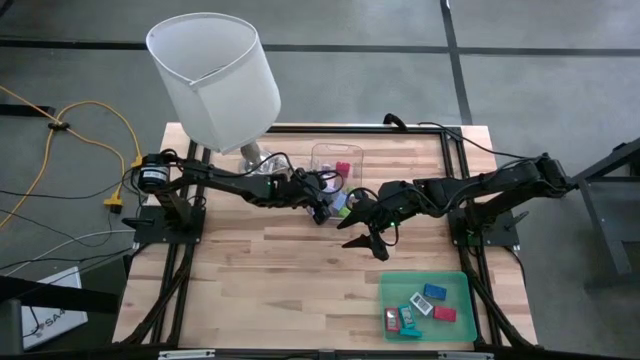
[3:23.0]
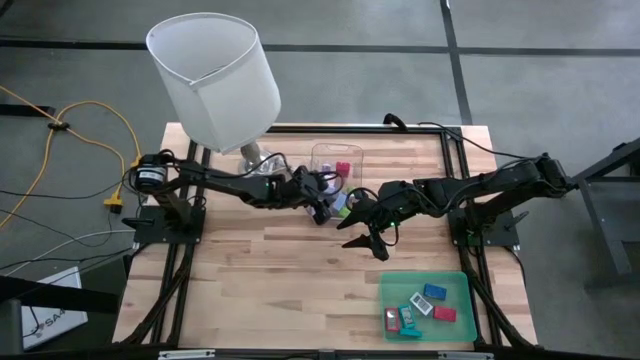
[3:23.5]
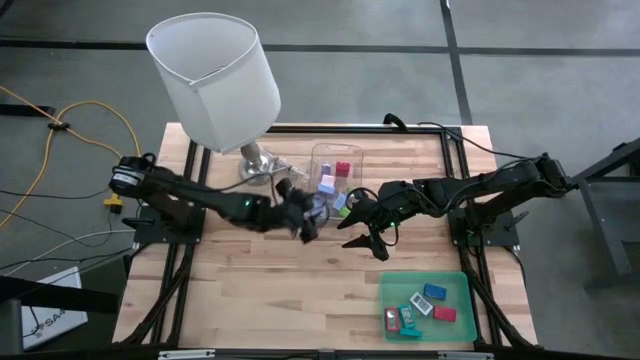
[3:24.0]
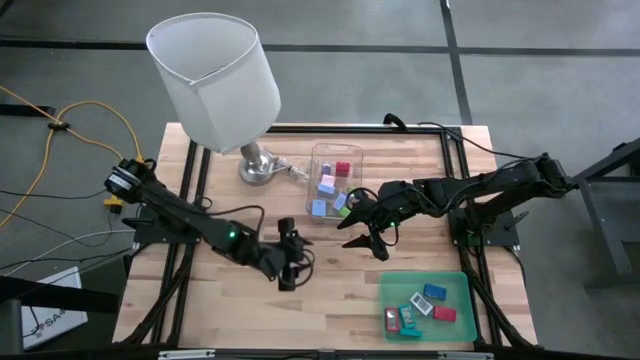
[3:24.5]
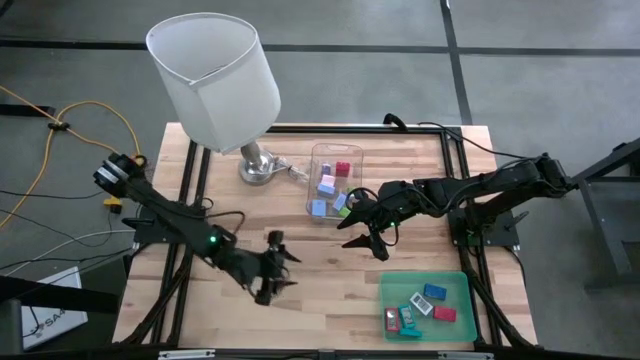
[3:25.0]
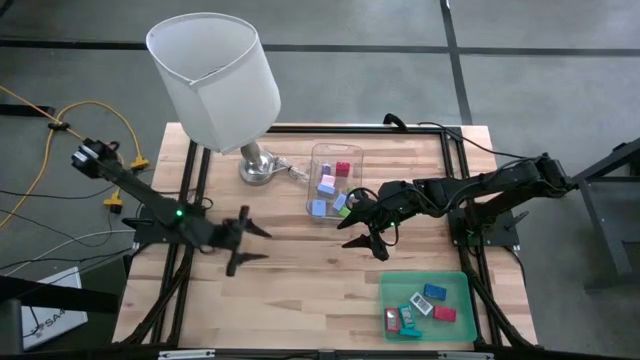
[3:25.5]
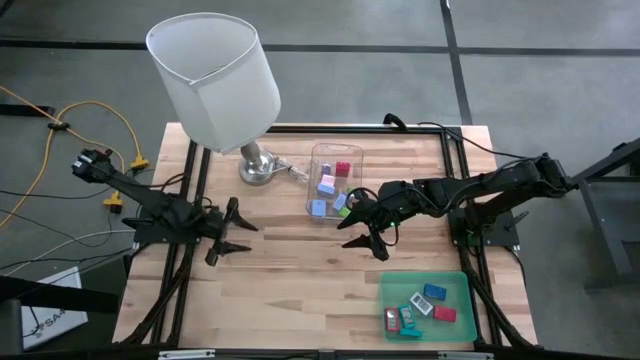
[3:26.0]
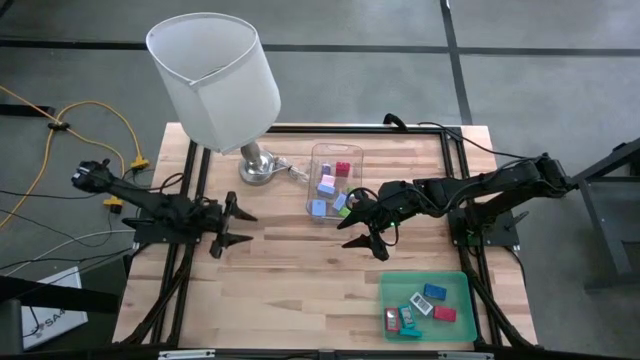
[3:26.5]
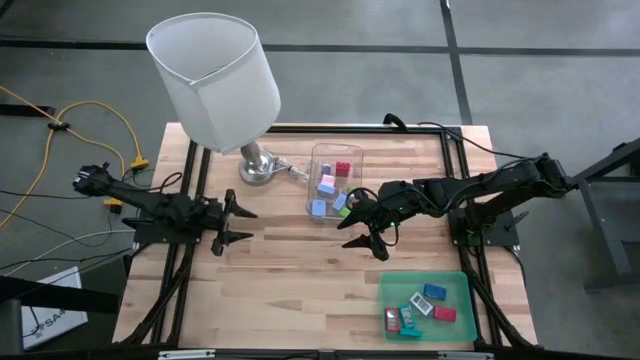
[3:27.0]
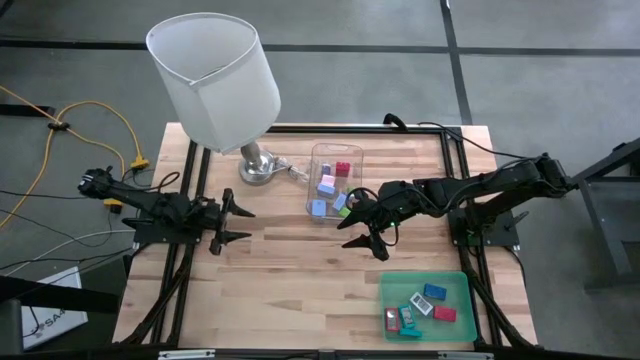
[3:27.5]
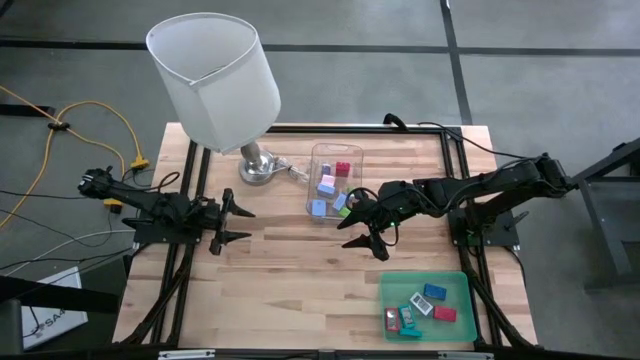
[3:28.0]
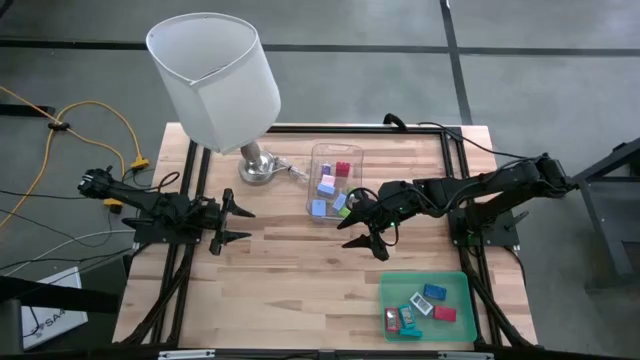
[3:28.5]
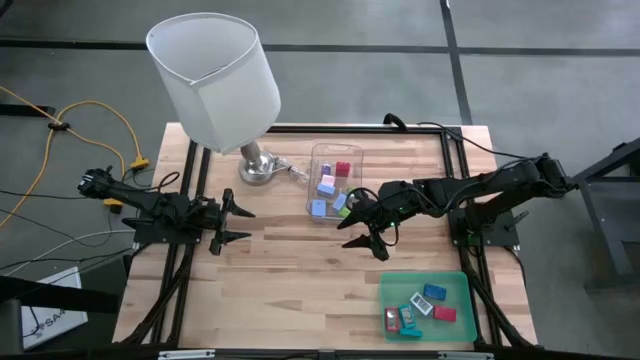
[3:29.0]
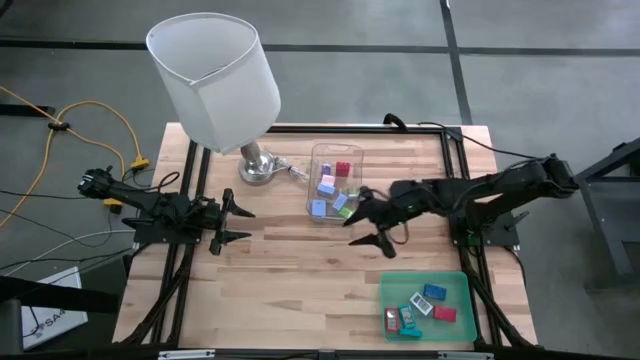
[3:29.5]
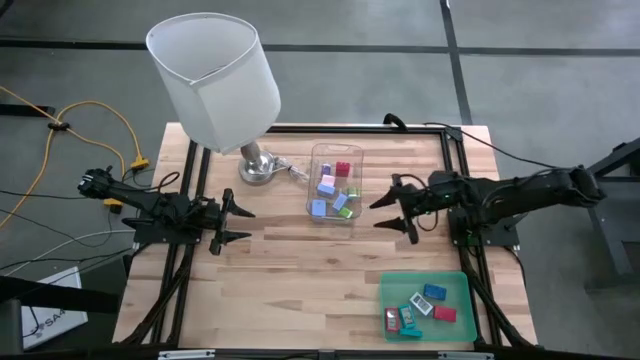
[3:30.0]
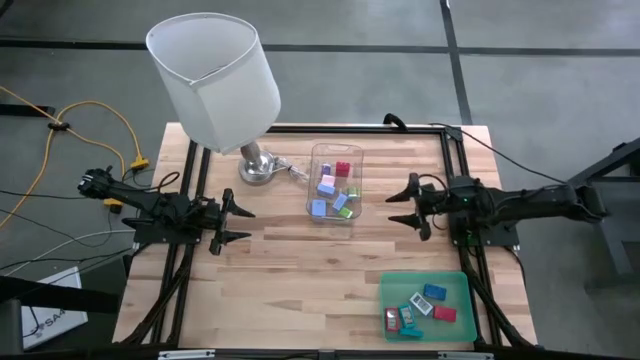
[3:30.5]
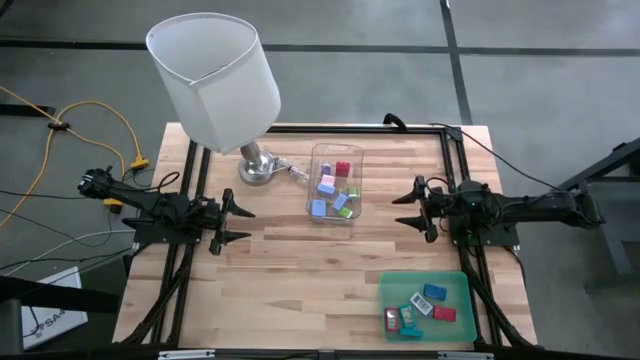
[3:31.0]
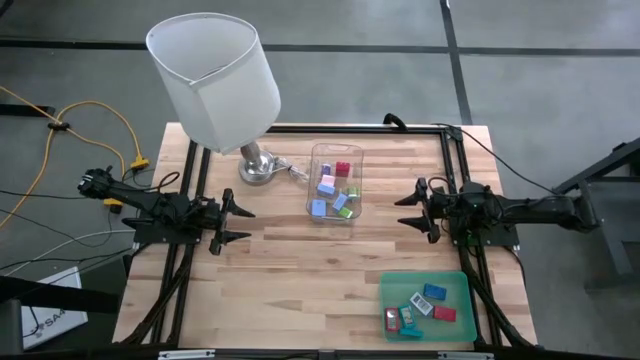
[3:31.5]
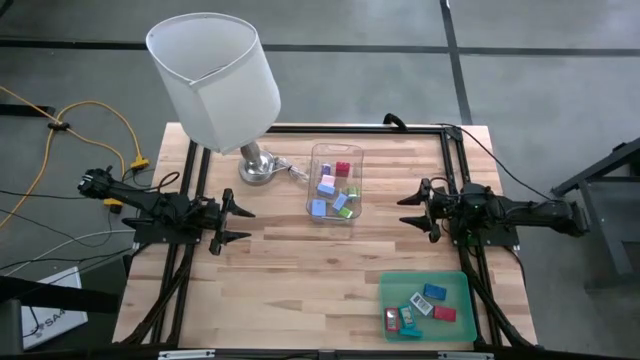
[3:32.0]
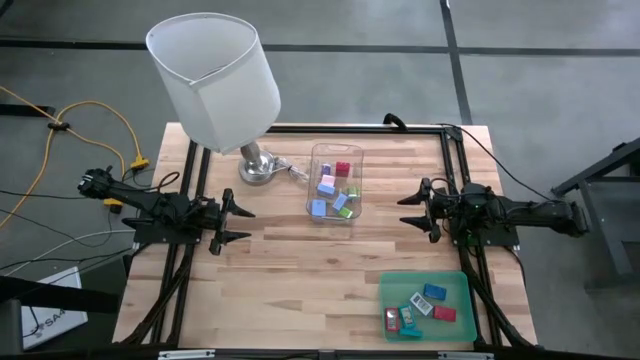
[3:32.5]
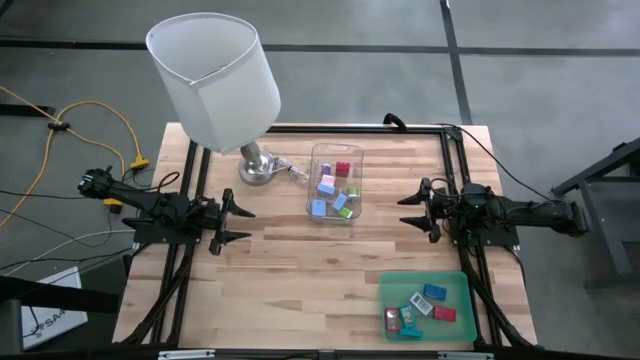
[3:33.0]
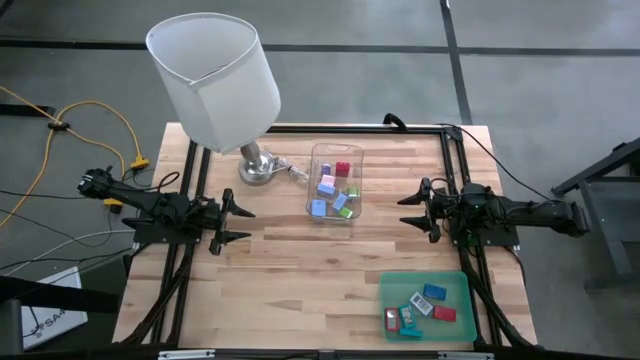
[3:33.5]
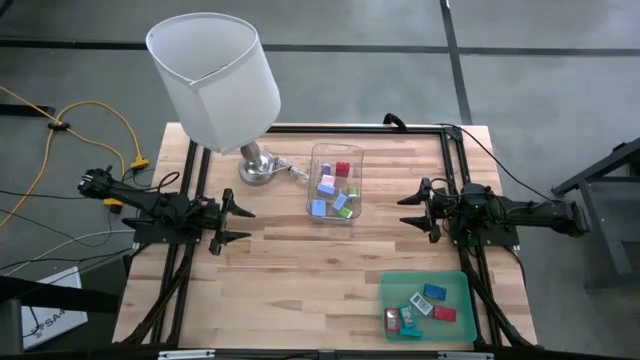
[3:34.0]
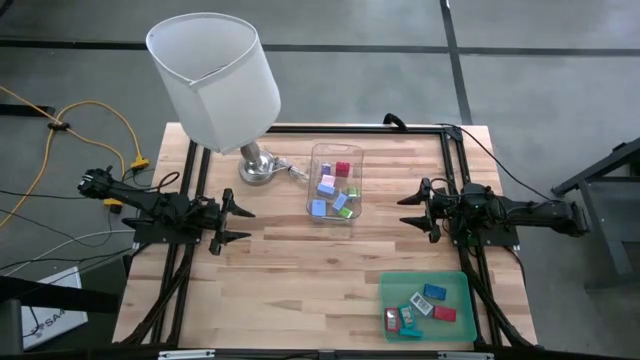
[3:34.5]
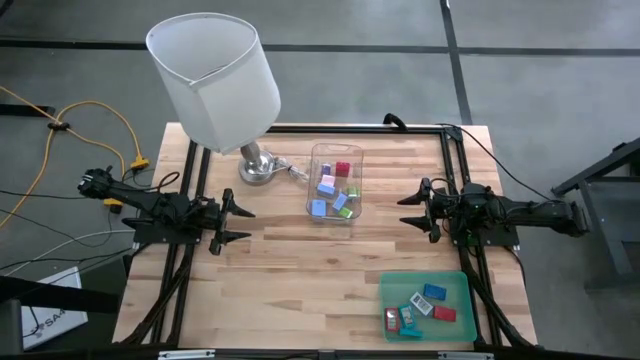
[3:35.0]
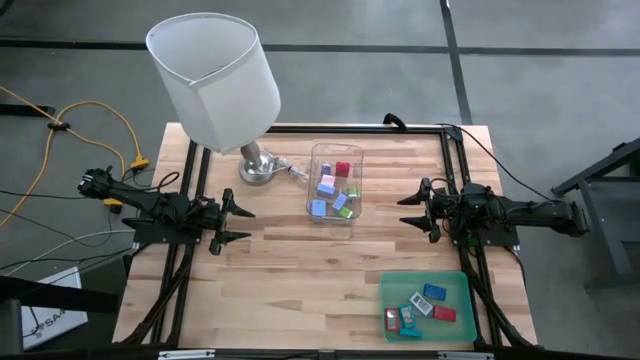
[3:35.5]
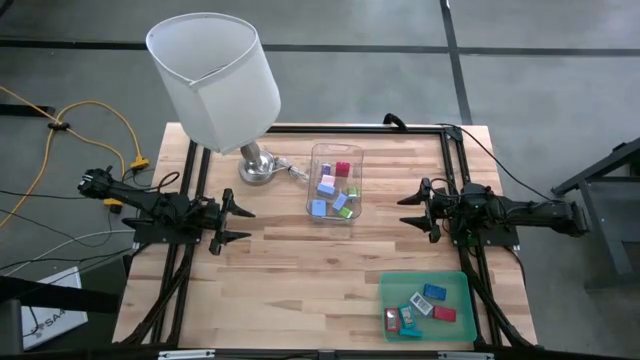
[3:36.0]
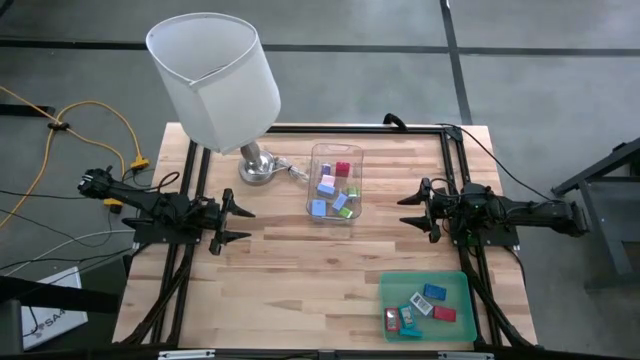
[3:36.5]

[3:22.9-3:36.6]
Task: Pick & Place Office items
Return to Home Position

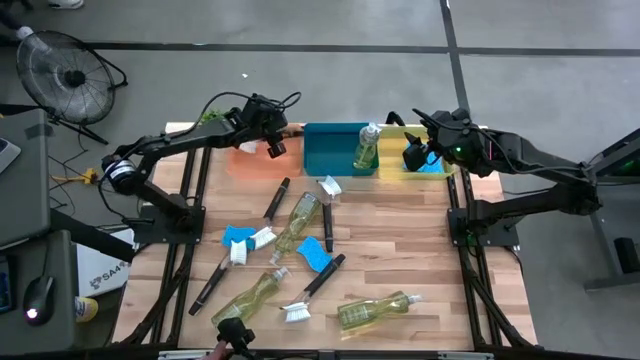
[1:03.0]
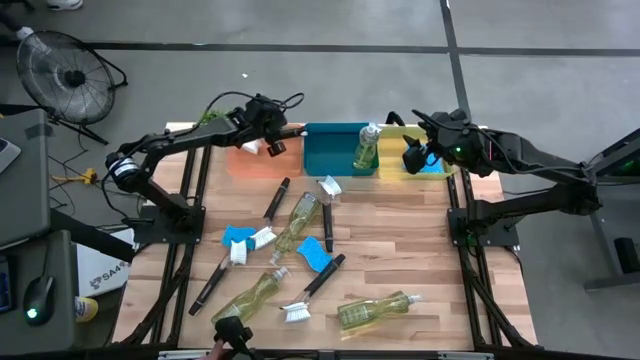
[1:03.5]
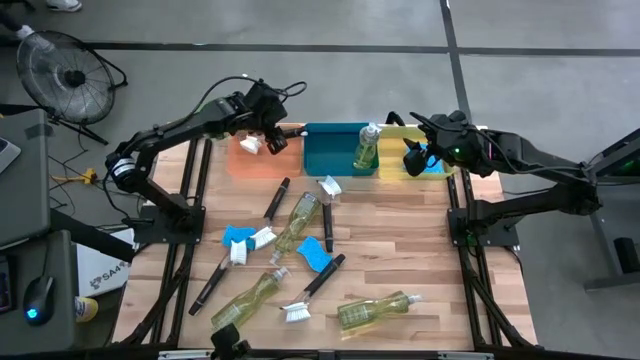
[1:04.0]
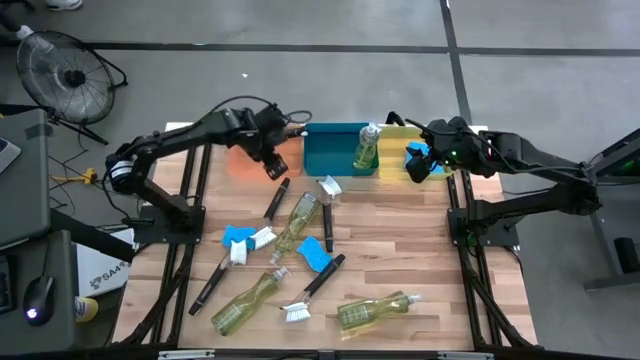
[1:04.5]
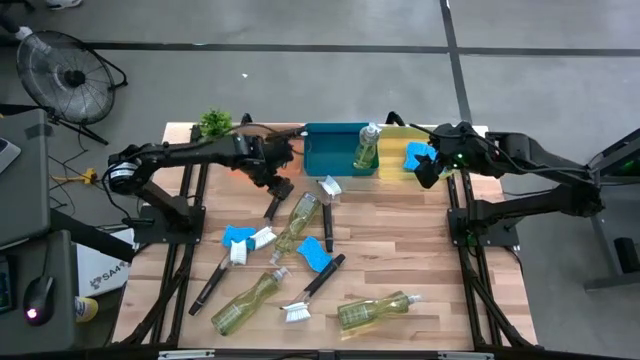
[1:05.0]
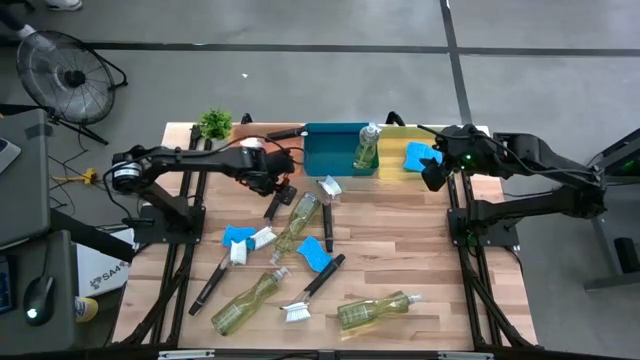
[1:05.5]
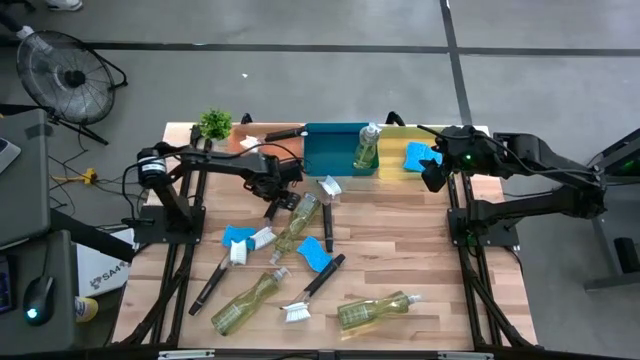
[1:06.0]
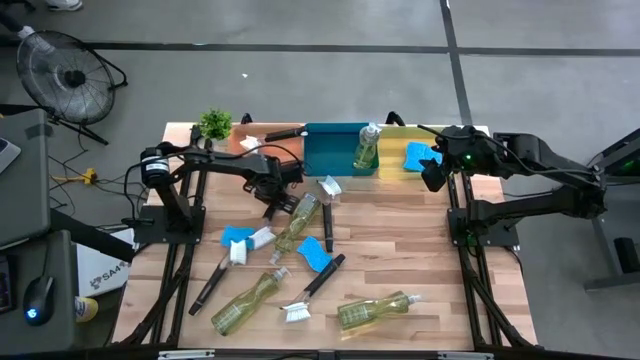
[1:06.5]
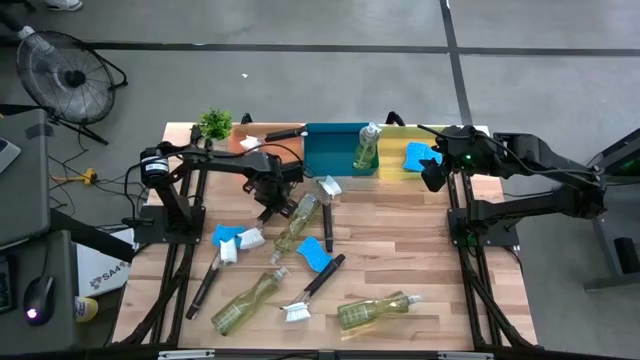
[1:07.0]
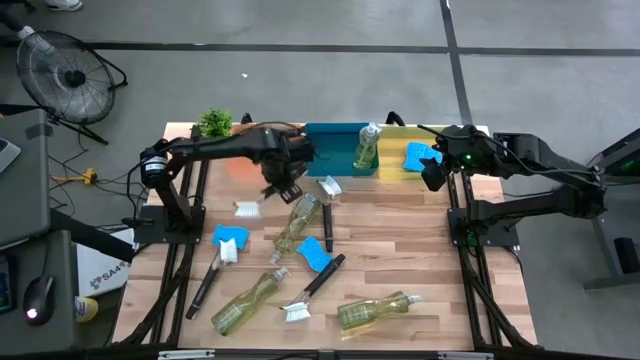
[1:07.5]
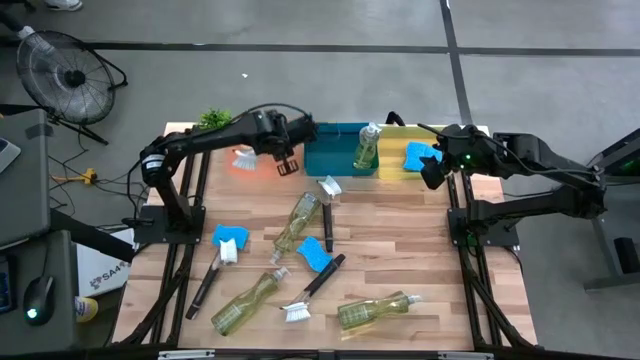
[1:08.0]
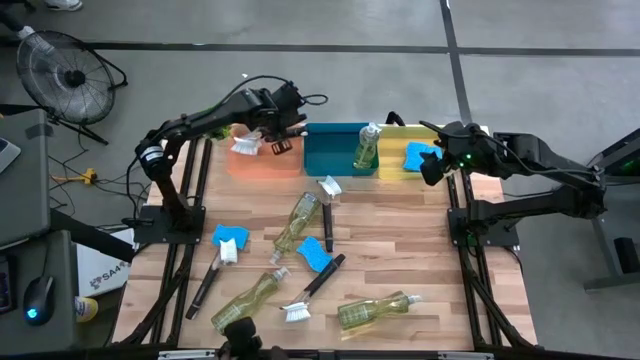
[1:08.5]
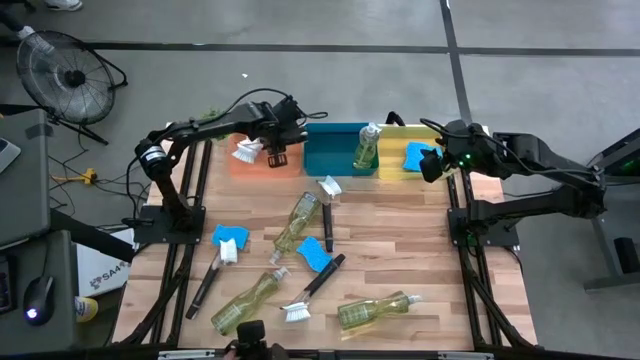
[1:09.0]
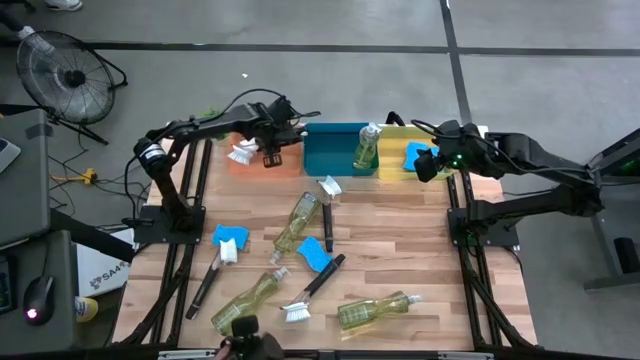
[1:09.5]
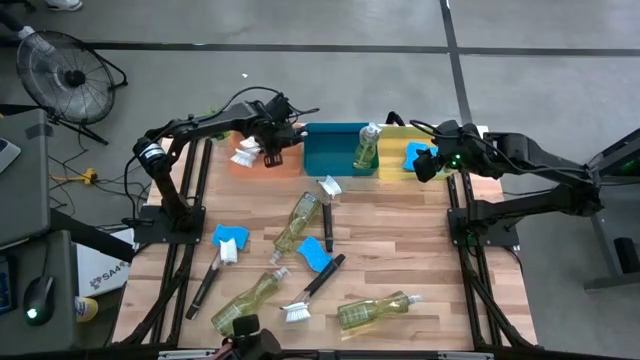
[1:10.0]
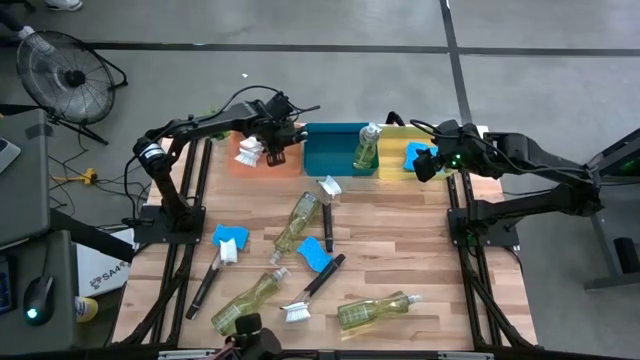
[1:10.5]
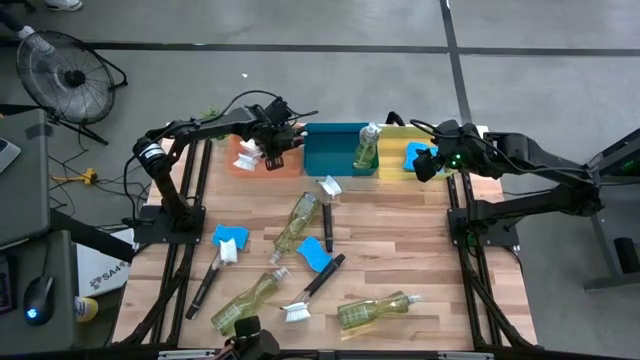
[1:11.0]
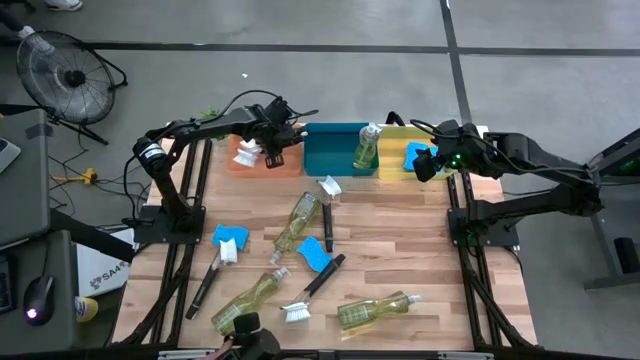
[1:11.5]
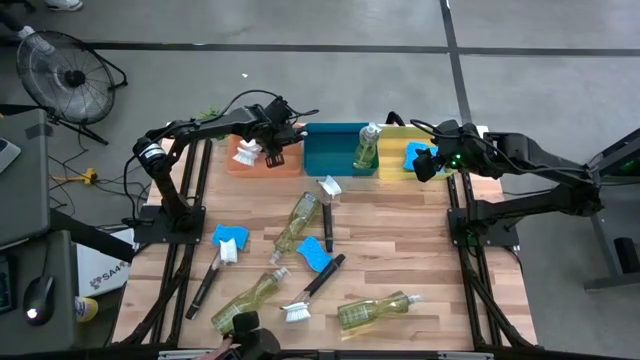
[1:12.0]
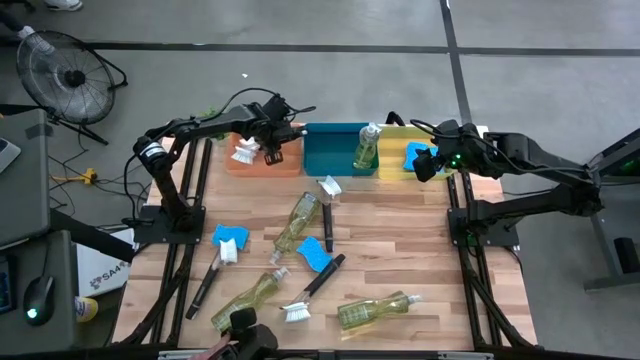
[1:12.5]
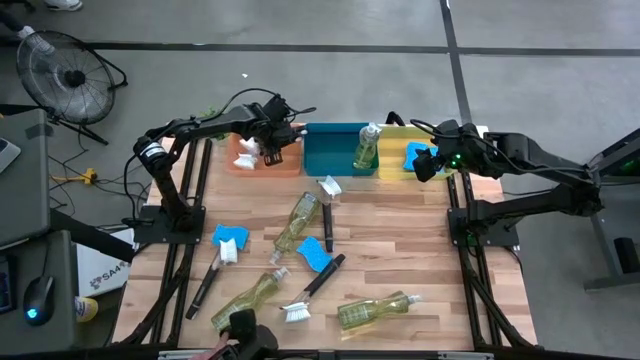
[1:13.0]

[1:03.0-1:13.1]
Task: Pick & Place Kitchen Sink Supplies
Put the cleaning brush into the orange bin
